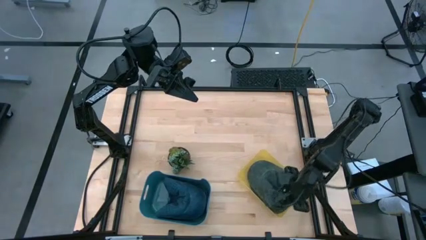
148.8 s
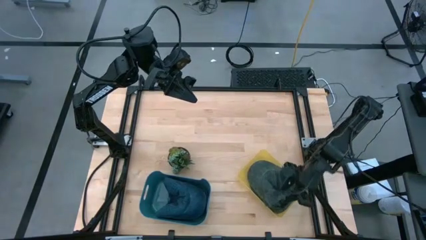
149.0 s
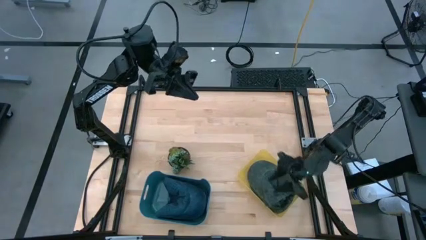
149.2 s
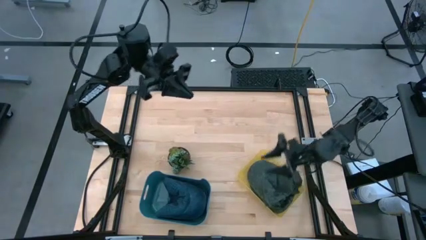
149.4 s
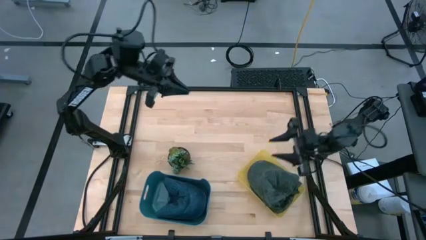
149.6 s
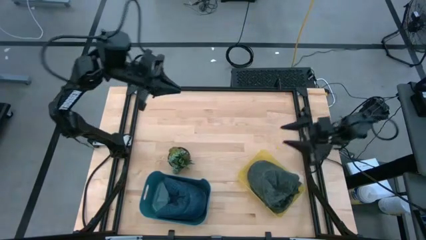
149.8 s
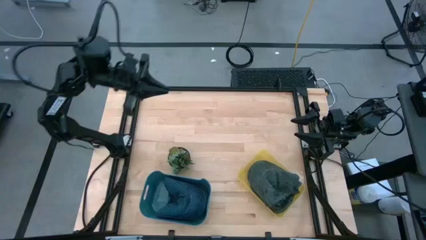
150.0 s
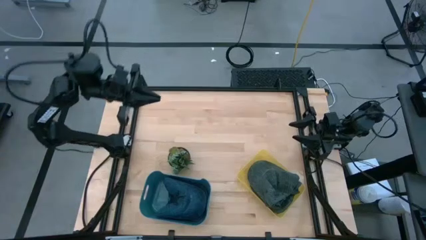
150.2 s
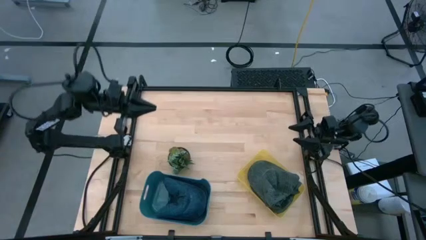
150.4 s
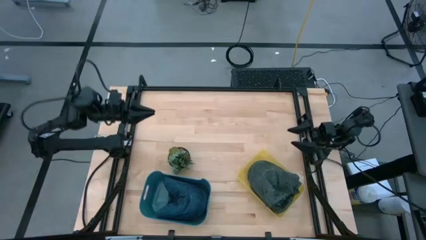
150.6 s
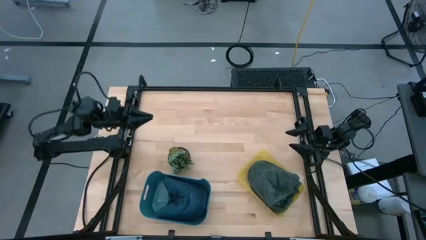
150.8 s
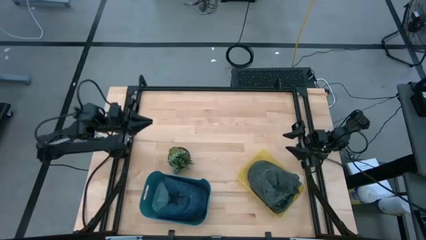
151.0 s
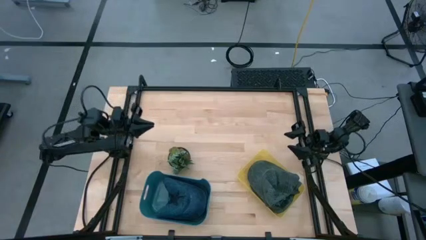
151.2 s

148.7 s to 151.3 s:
Task: Pick & Place hat
Return to Home Position

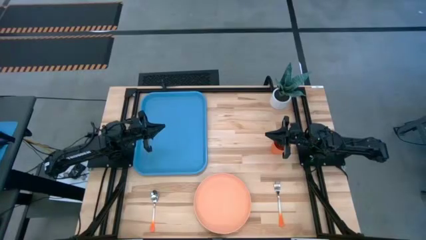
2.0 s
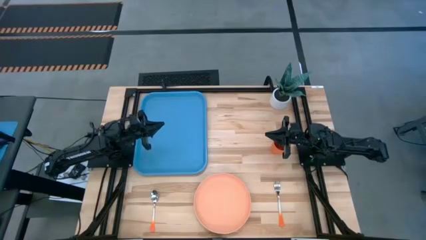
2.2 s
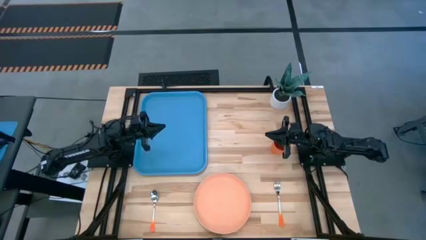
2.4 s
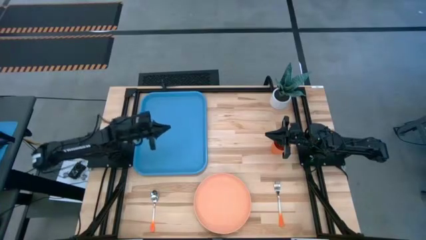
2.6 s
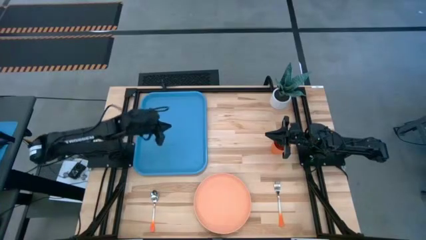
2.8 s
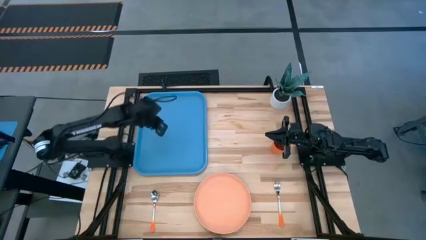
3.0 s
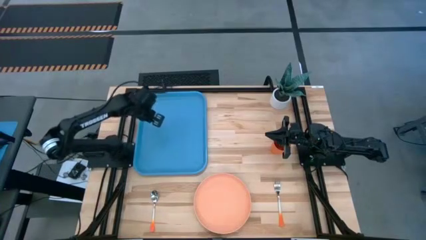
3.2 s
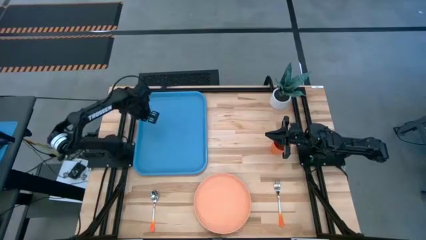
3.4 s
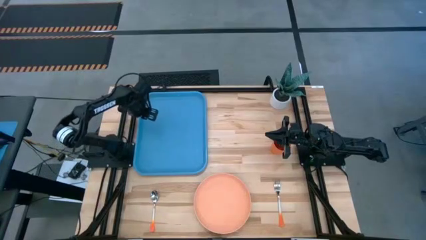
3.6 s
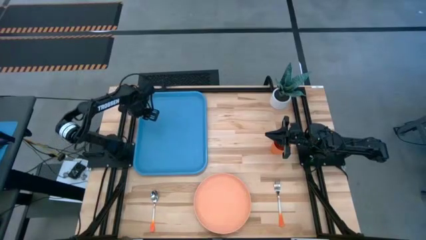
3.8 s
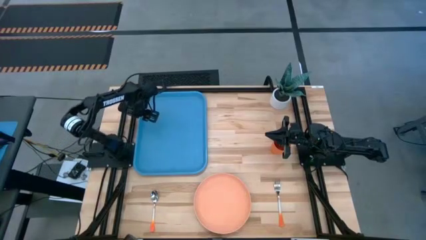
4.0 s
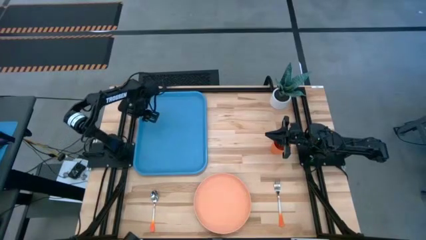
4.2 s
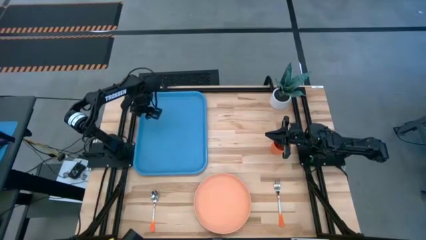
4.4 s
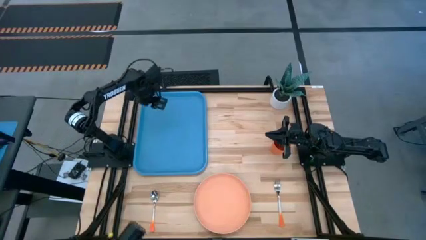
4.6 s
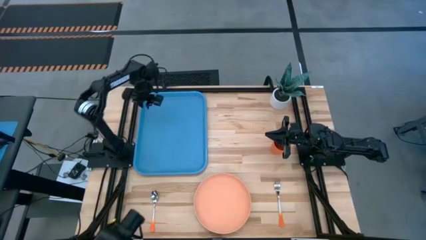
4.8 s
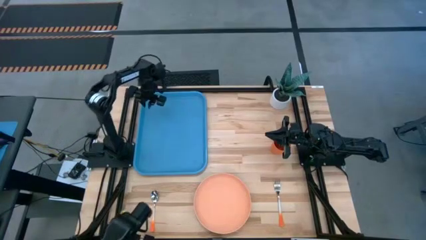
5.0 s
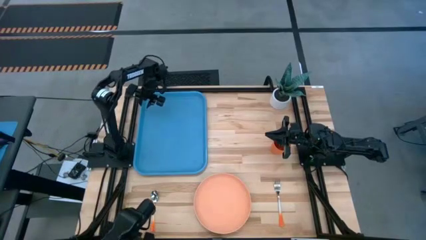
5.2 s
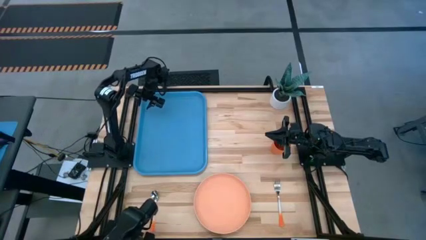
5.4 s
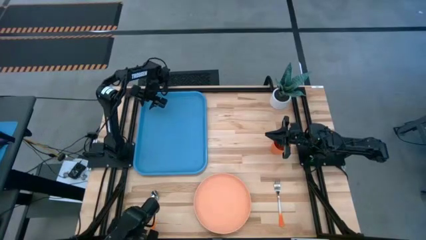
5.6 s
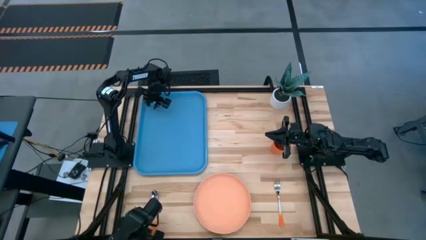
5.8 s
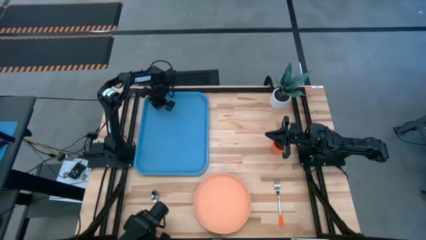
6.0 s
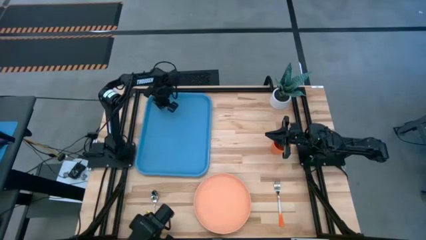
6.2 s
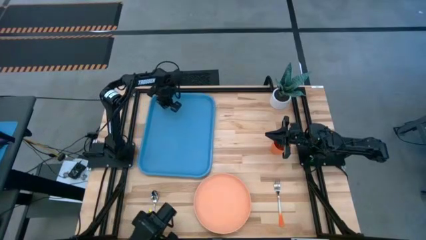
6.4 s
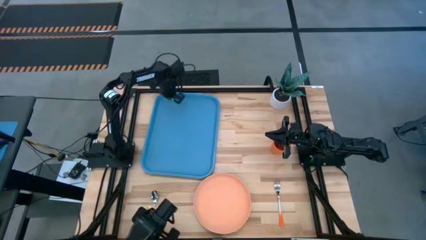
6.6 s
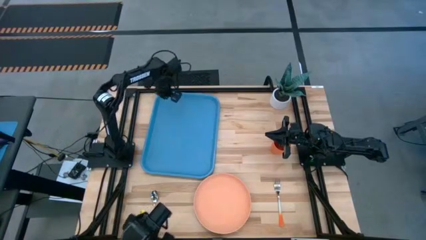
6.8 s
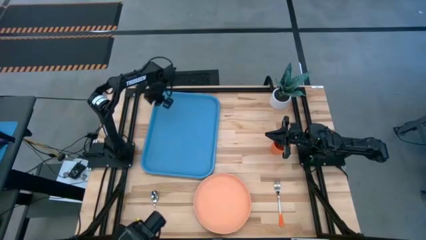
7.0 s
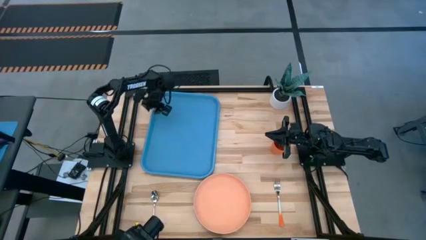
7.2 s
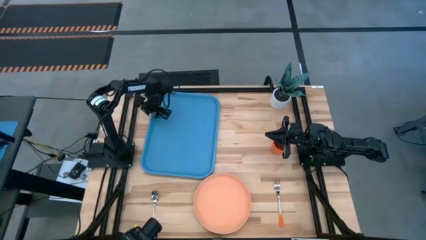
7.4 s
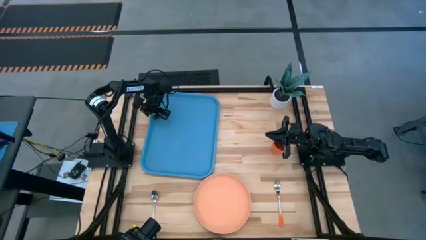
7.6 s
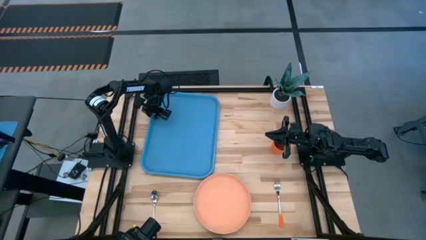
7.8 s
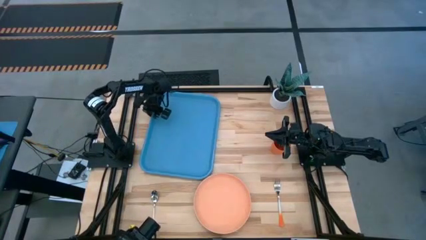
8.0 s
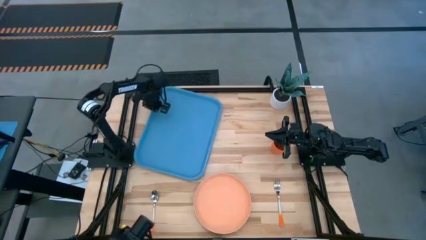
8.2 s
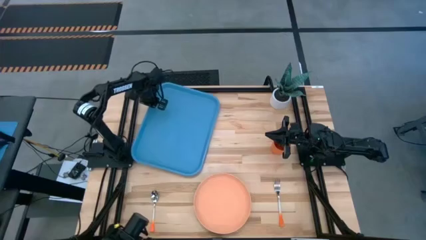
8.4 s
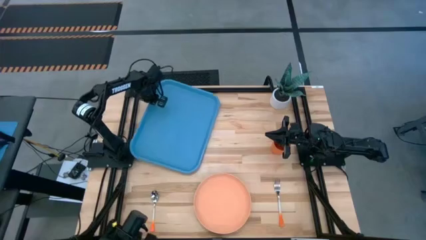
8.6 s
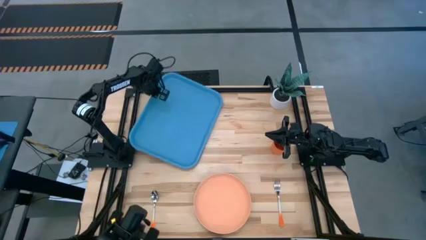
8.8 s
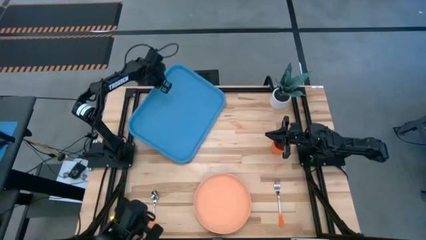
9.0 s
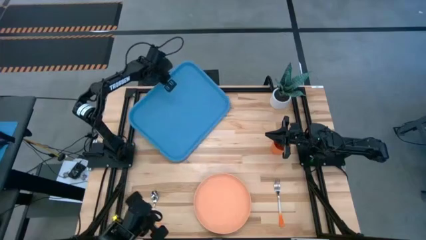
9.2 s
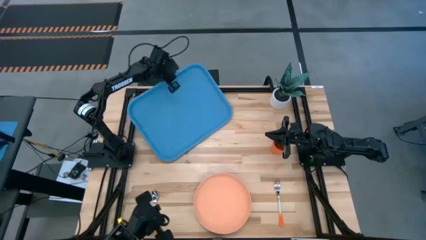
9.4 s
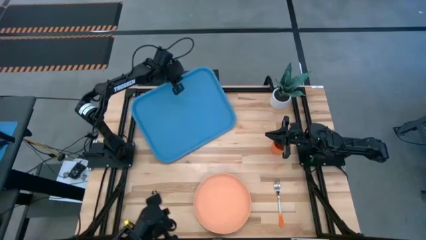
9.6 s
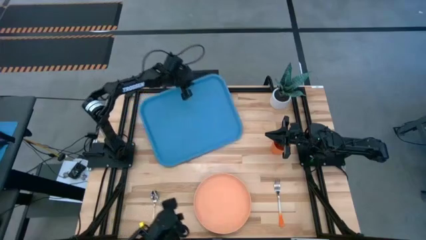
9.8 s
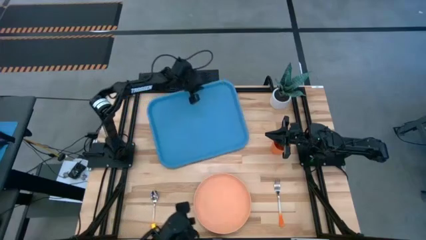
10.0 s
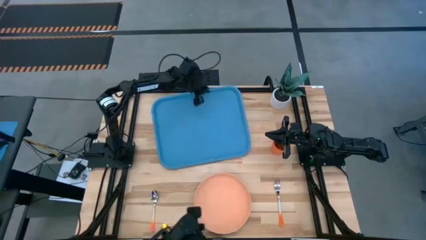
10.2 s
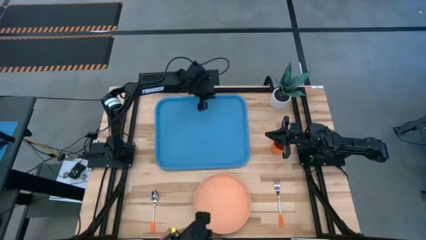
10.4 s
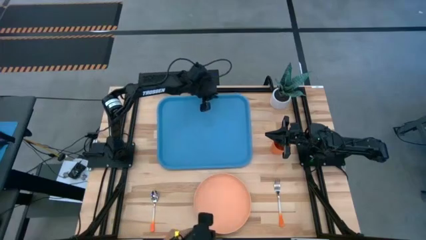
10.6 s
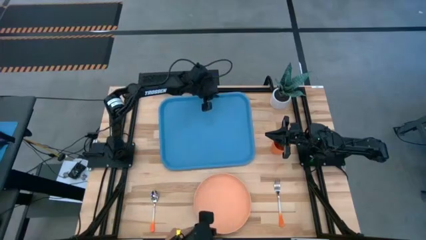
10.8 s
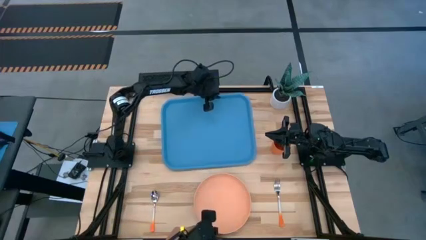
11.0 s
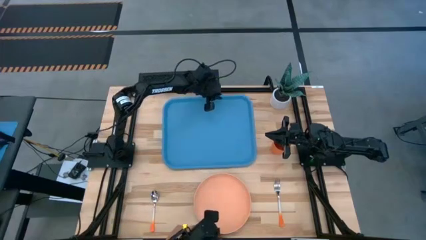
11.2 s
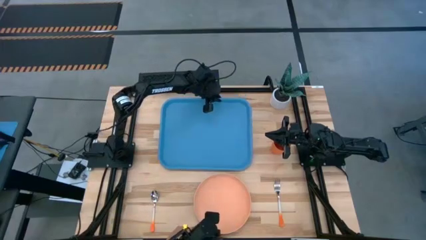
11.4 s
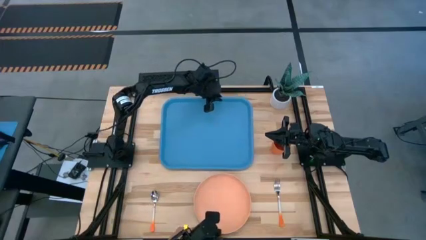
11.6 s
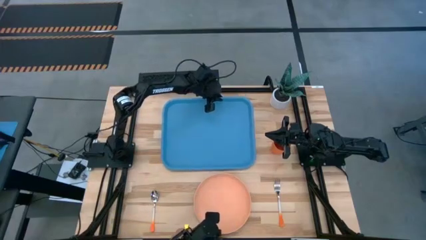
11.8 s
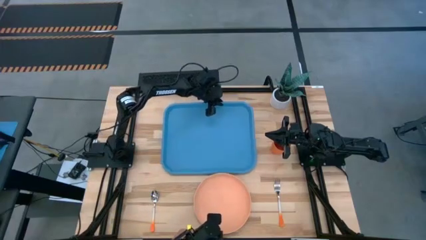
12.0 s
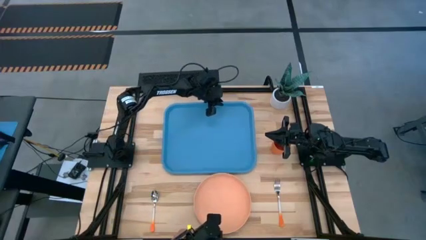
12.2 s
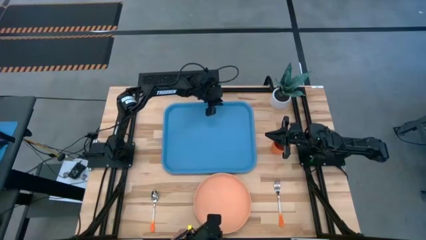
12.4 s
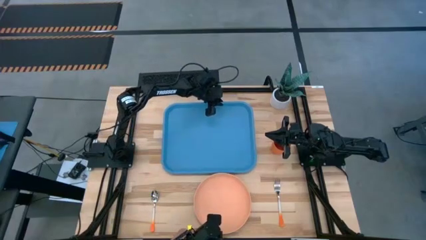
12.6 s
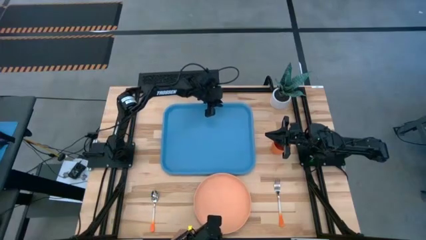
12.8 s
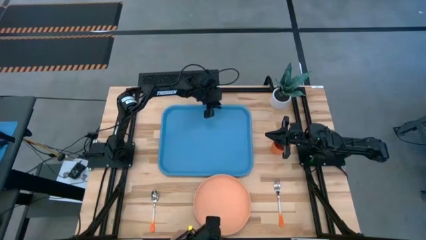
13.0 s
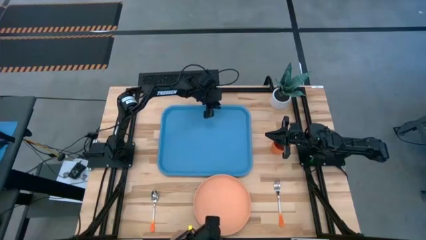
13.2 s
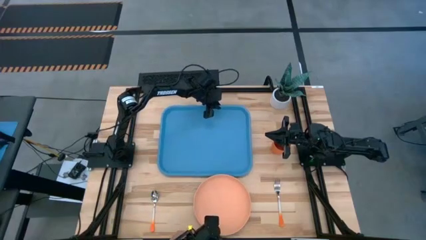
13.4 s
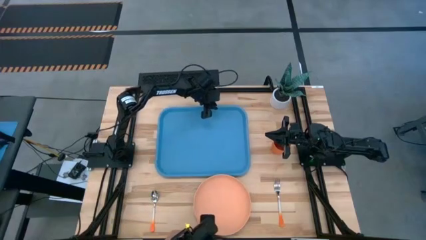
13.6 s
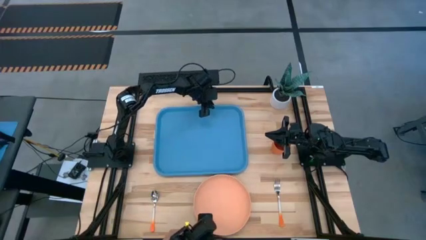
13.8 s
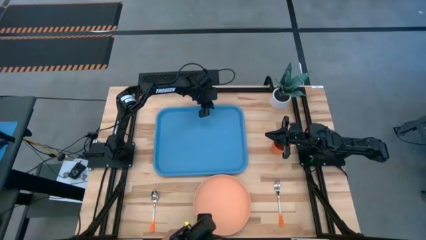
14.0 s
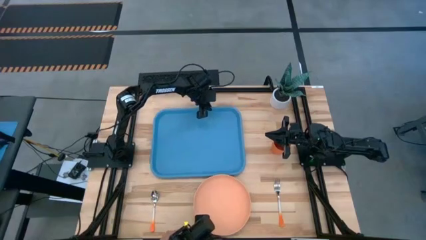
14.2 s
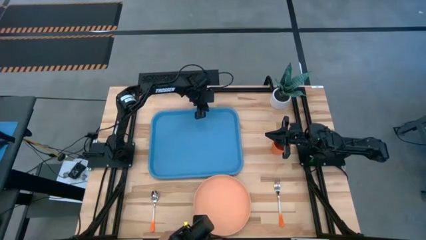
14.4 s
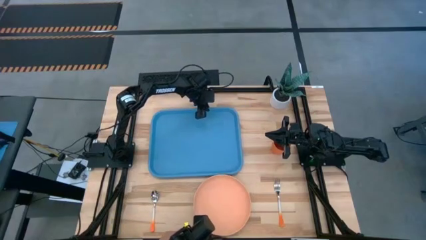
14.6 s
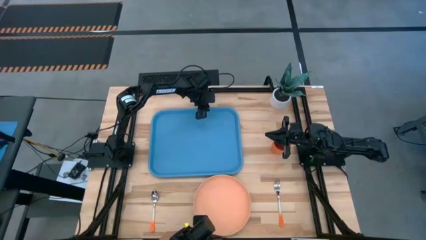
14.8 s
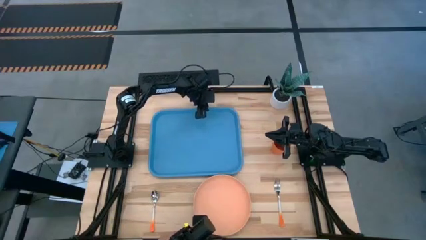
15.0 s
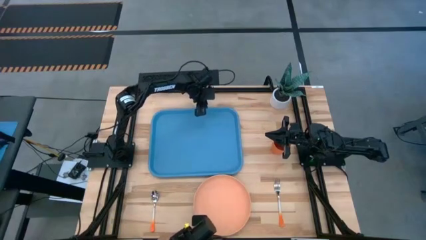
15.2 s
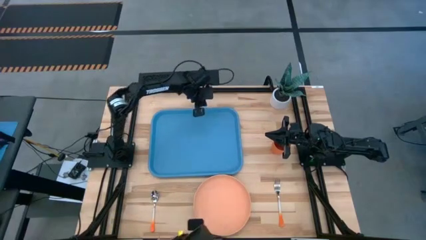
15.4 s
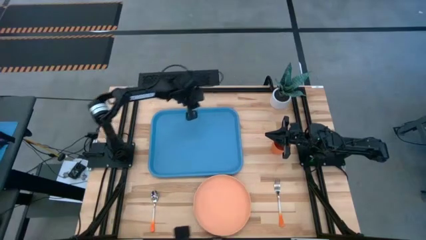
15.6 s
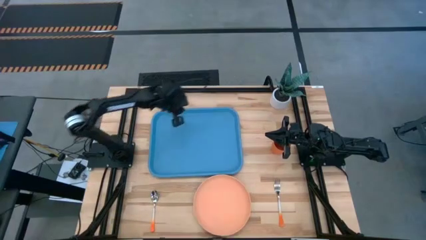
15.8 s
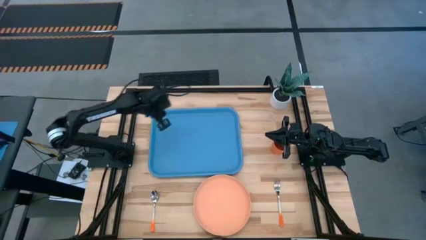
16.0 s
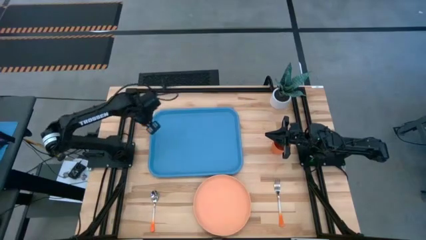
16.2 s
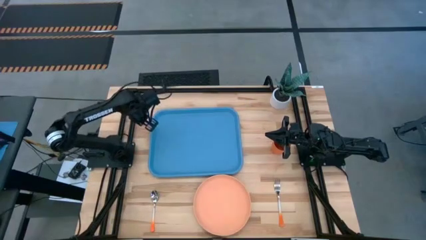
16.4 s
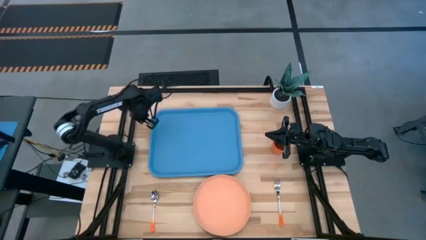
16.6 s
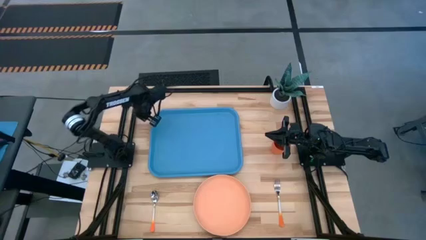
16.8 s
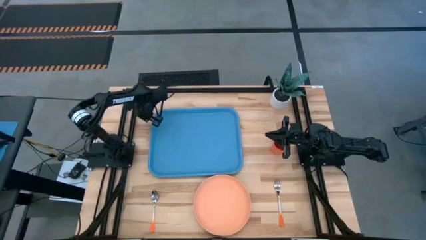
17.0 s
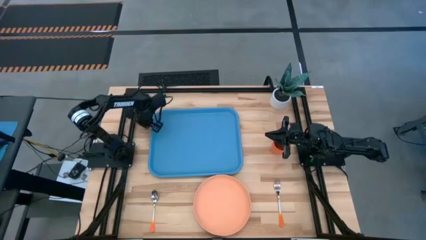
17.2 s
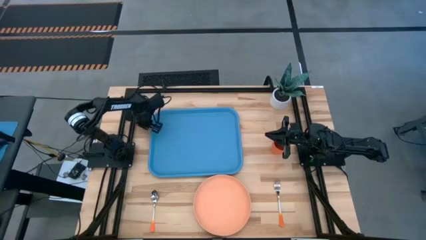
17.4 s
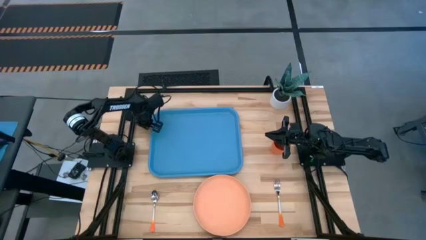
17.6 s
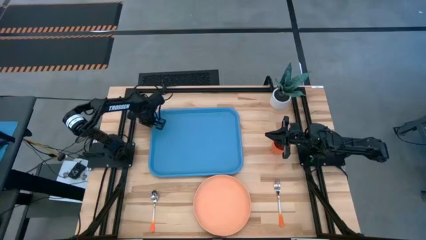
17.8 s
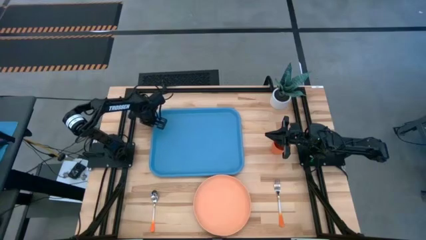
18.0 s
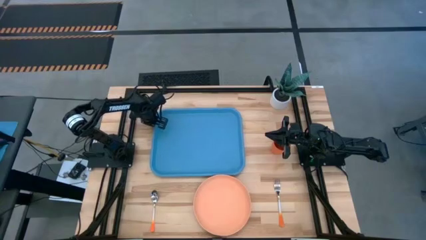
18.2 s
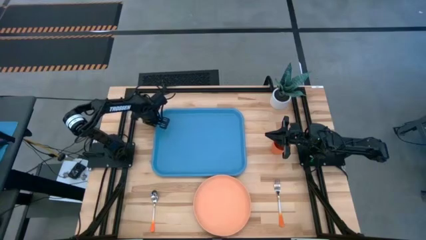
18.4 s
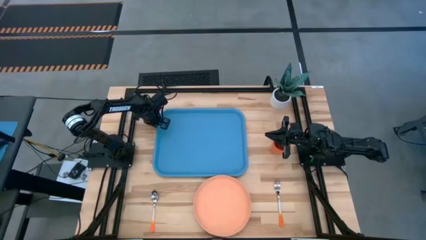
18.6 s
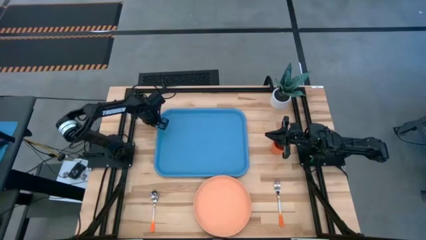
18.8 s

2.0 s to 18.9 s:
Task: Pick and place plate/cup/fork/spoon on tray
Prepare the blue tray
